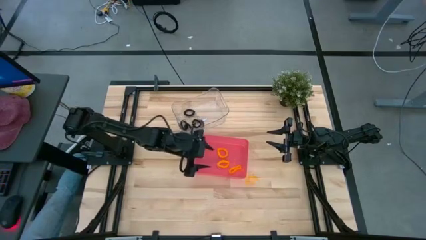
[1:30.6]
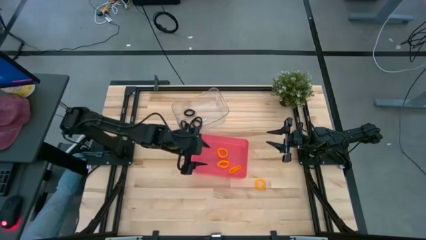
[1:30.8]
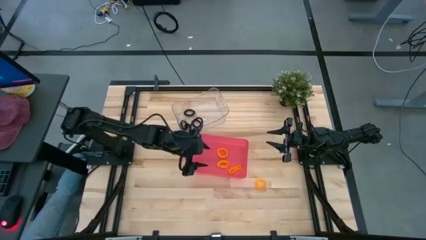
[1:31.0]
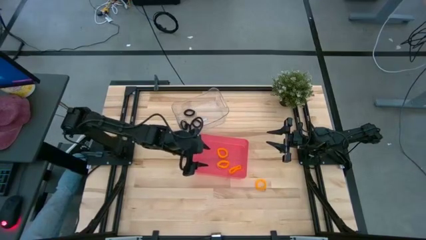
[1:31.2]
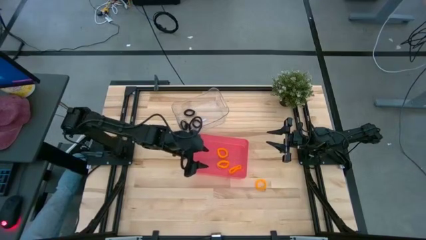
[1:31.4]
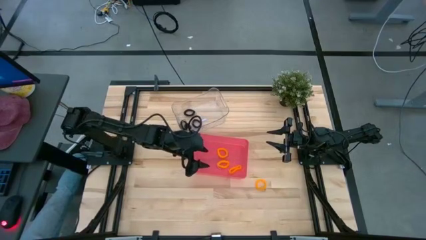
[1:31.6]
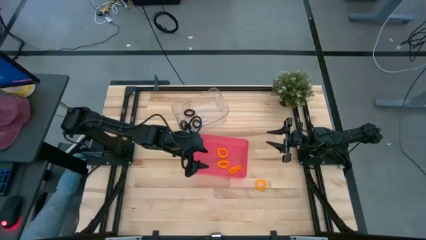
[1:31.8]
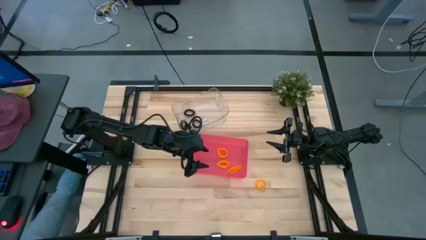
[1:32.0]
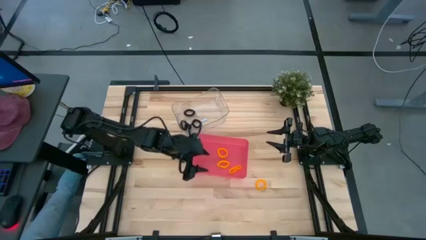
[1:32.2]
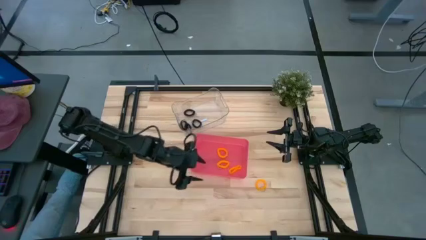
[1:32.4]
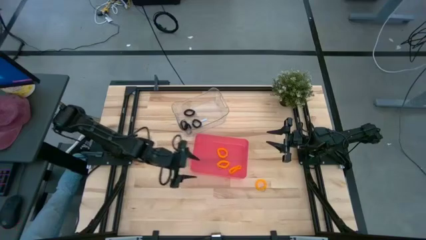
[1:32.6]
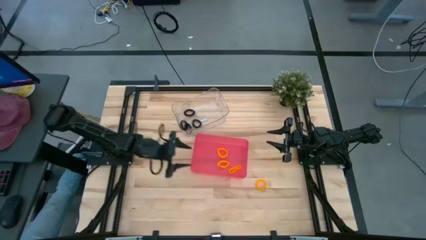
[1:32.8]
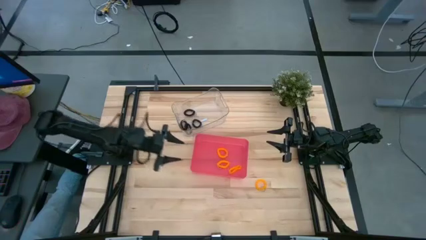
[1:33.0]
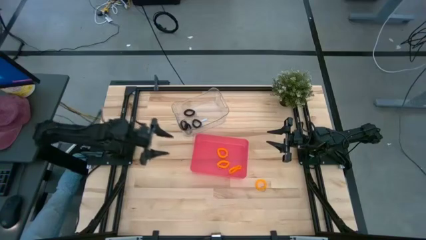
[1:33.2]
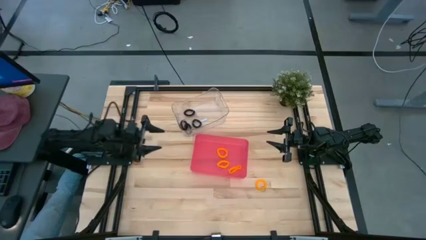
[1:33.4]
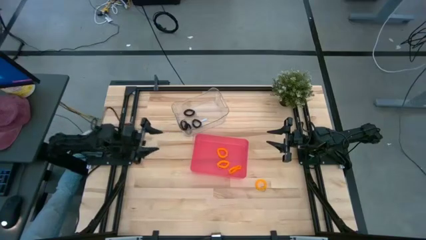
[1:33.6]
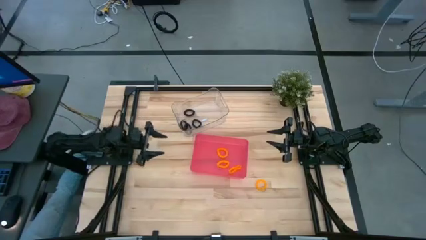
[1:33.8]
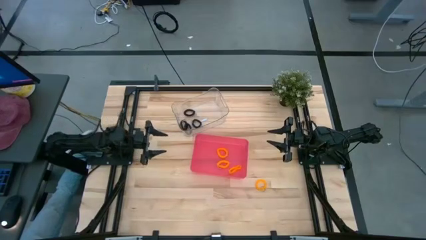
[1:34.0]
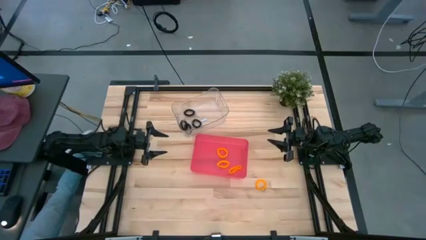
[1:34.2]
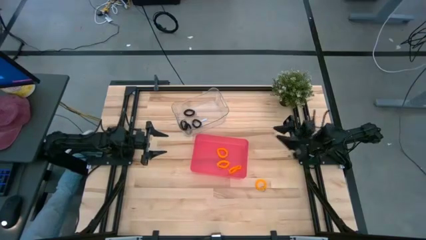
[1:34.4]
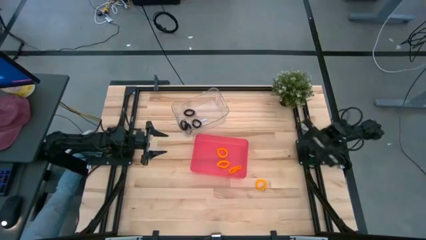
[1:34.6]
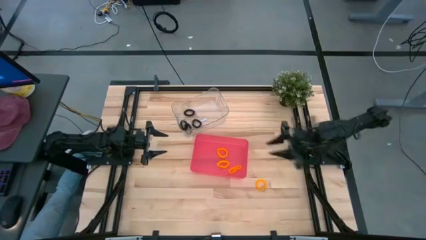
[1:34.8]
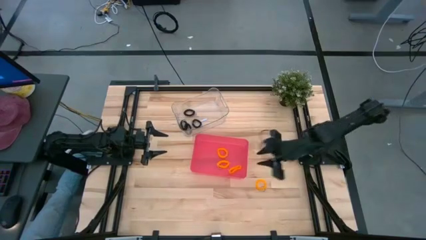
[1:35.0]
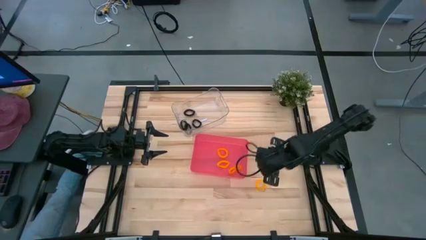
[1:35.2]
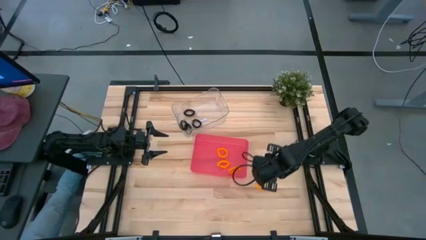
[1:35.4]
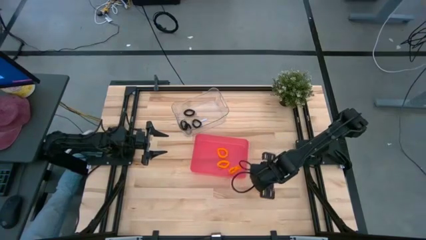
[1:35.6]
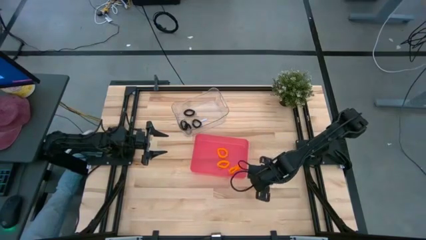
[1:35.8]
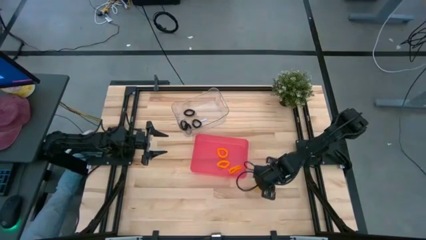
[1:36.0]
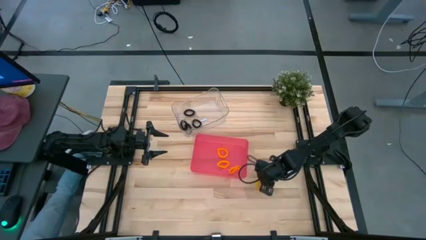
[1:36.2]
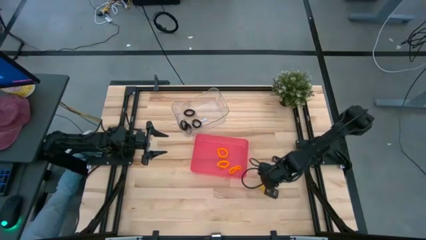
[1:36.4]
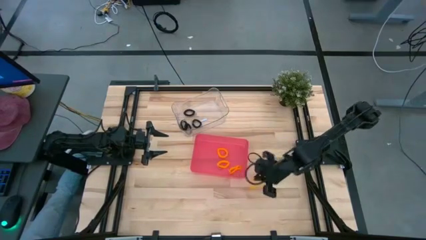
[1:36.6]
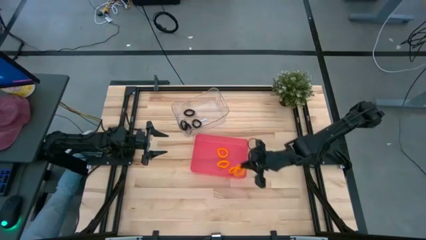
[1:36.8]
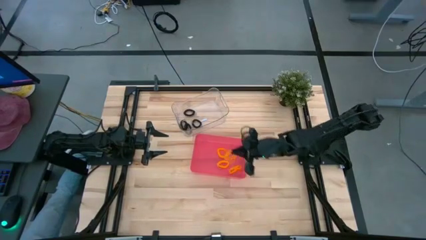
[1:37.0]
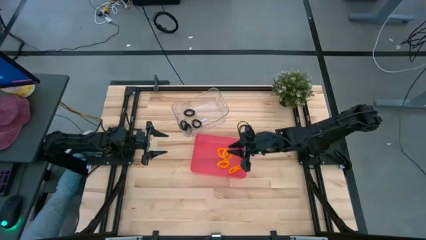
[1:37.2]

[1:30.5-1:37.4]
Task: Sort spring keychains
Put the yellow spring keychain into the red bin

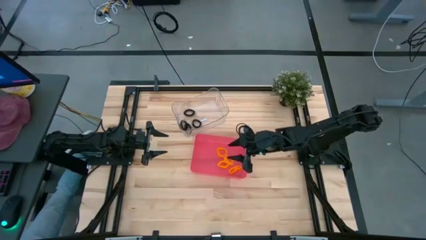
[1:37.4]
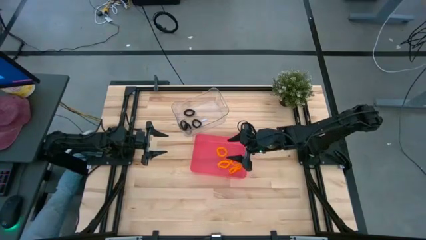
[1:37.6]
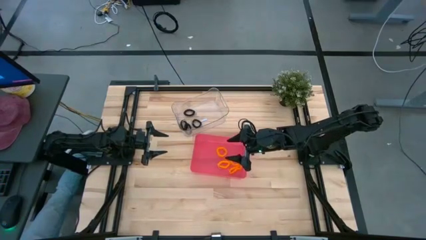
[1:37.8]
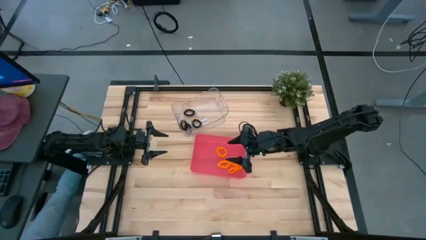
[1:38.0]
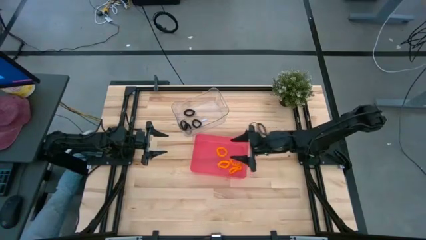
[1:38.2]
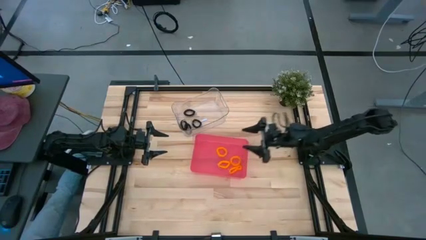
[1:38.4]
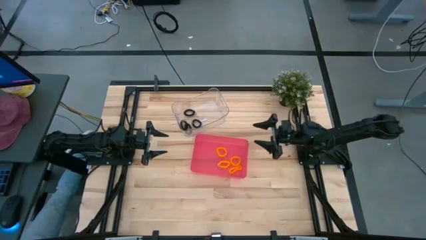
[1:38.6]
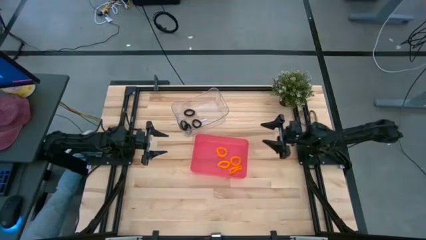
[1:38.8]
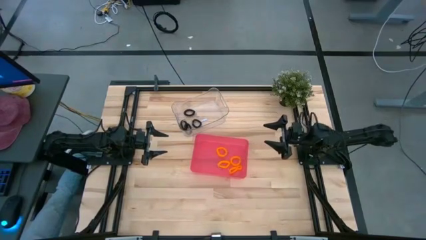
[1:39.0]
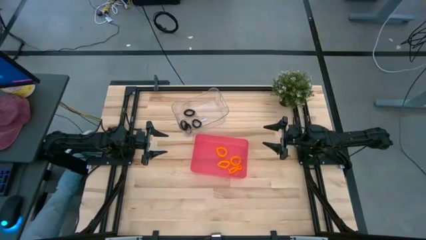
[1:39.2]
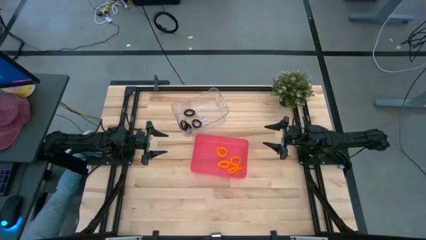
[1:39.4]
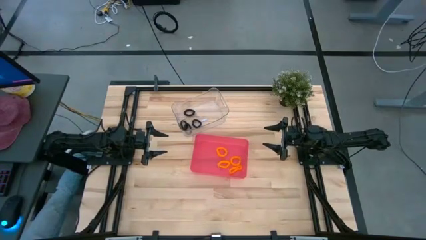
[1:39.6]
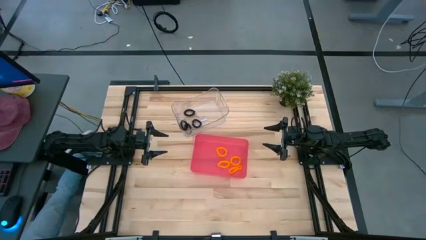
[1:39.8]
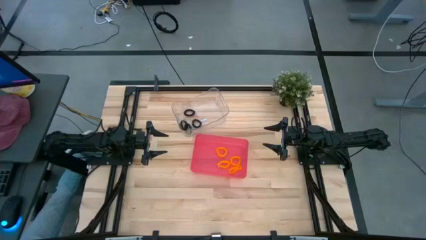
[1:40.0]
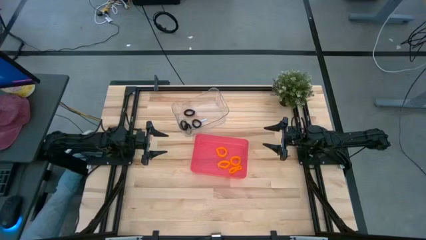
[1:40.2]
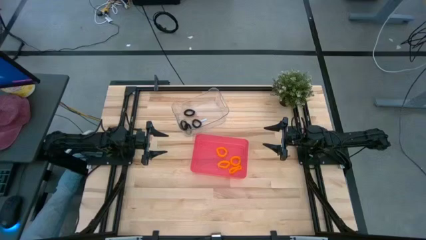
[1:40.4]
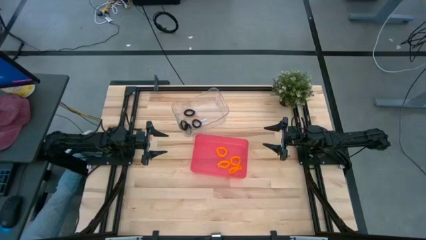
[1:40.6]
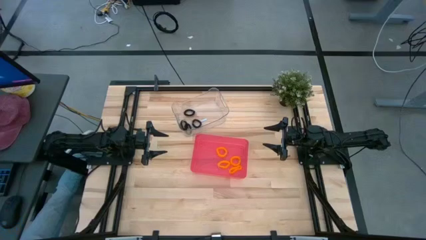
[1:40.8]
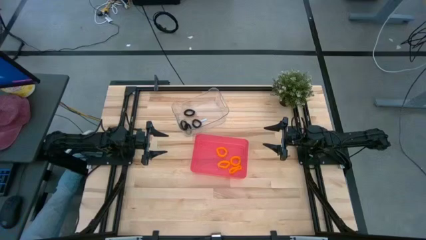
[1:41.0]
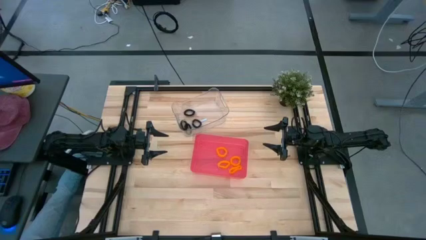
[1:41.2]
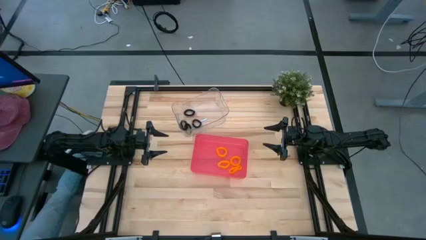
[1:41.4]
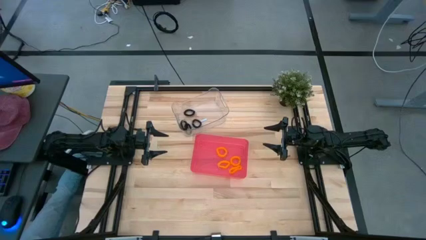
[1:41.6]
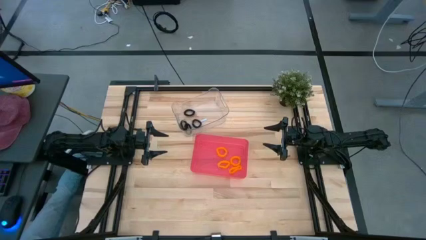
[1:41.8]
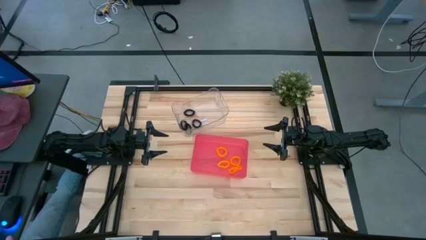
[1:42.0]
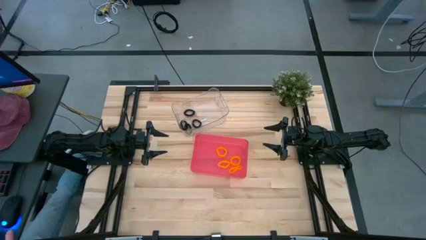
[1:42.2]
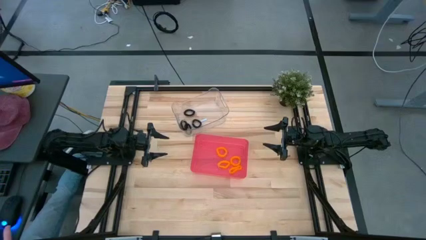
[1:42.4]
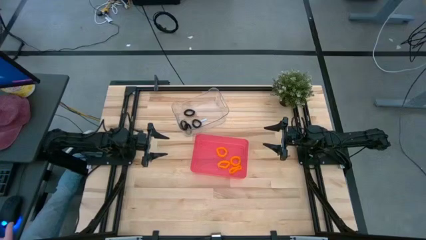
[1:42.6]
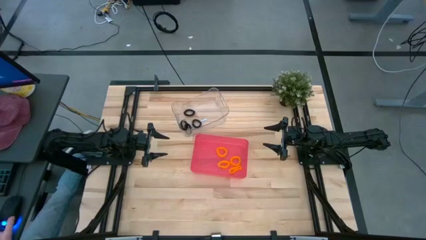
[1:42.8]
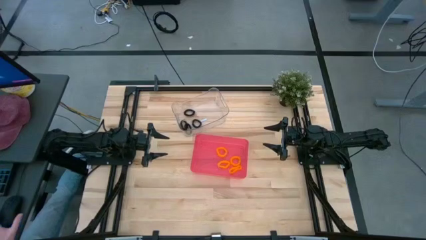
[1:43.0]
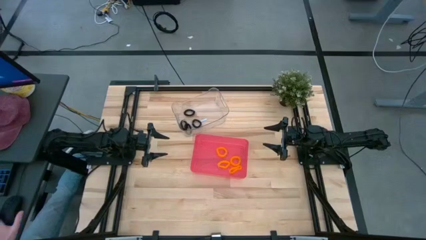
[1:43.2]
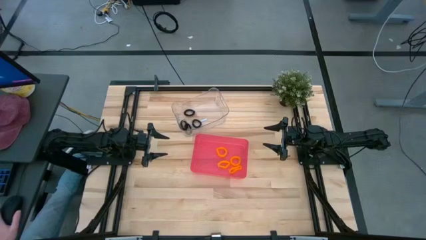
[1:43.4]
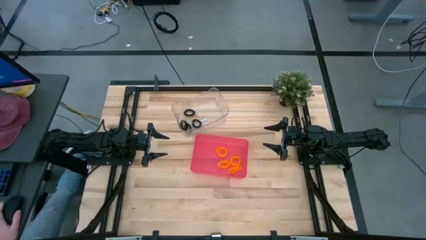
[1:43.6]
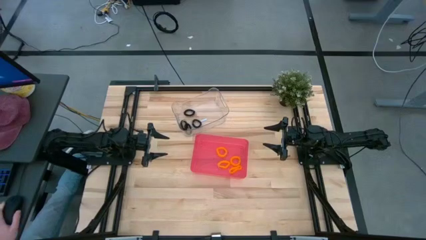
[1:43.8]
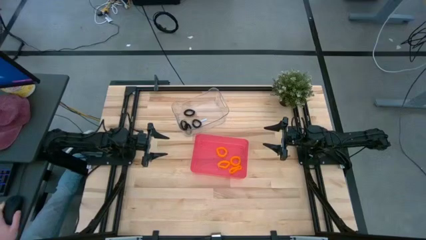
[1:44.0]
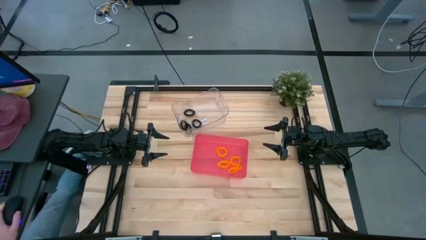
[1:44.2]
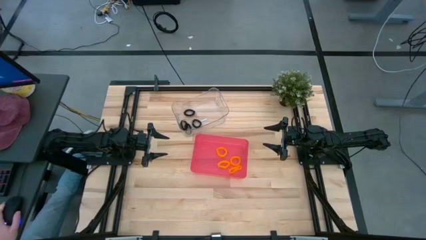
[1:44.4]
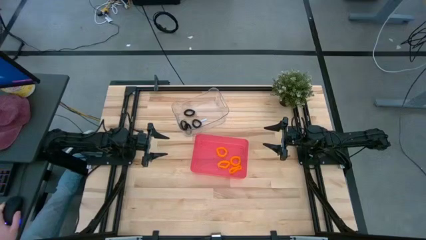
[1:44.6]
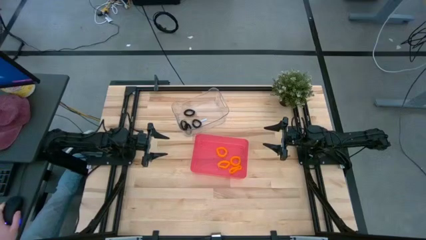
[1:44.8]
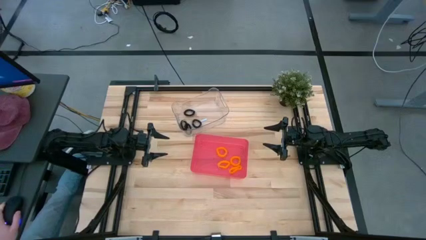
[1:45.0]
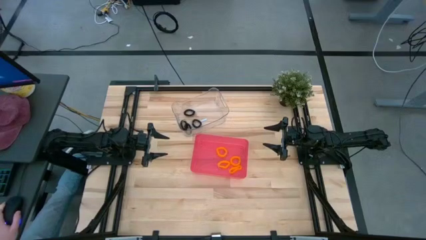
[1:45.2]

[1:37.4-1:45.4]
Return to Home Position

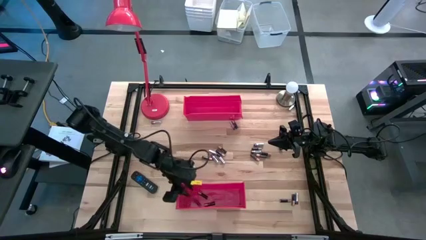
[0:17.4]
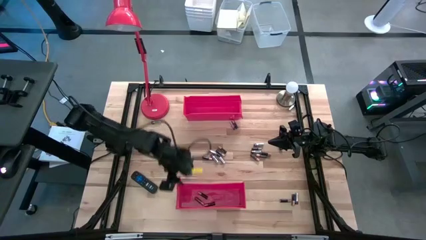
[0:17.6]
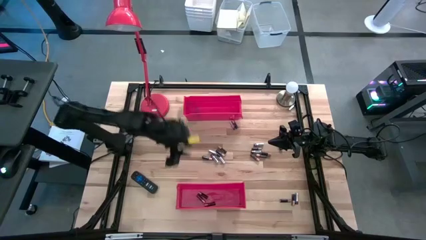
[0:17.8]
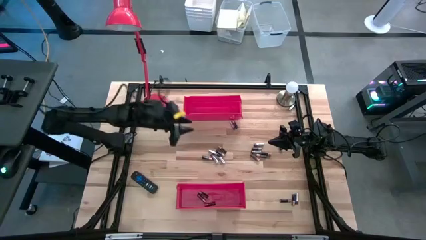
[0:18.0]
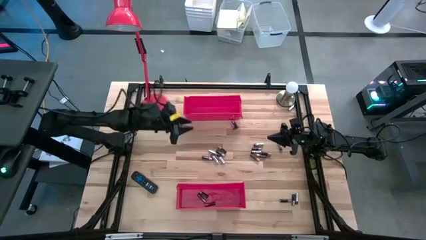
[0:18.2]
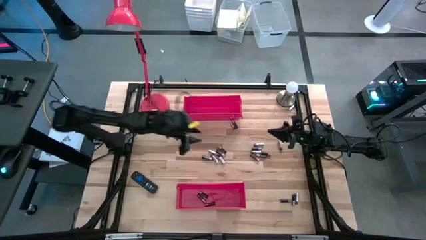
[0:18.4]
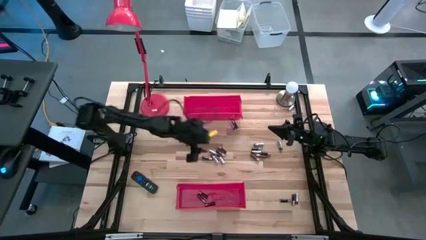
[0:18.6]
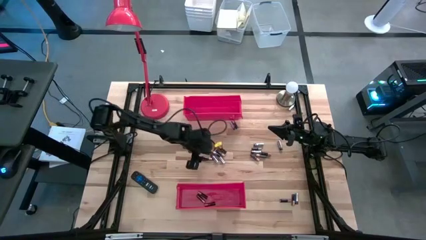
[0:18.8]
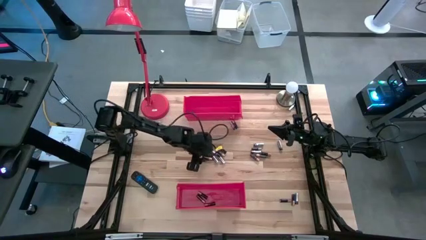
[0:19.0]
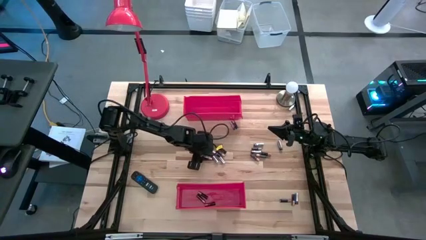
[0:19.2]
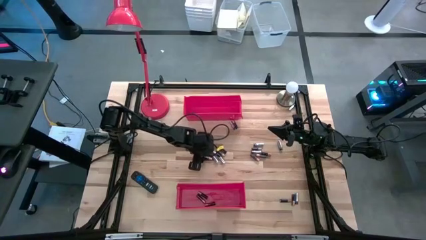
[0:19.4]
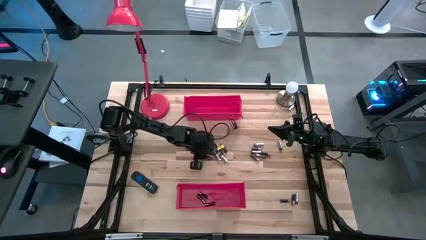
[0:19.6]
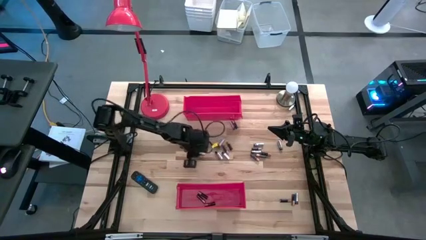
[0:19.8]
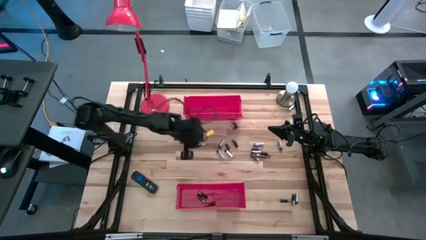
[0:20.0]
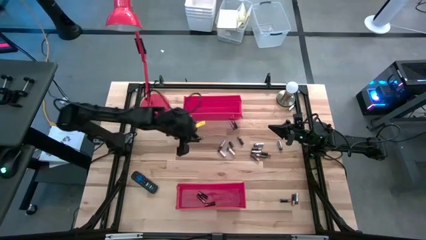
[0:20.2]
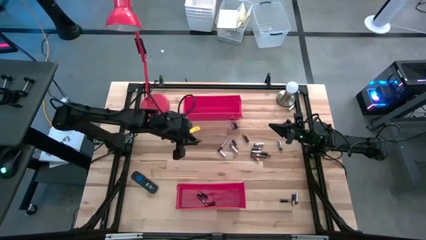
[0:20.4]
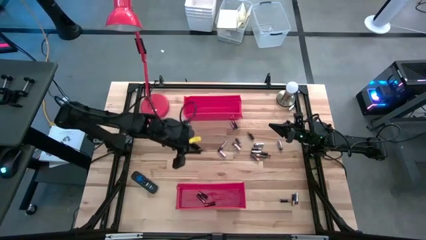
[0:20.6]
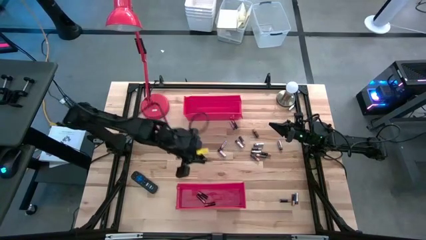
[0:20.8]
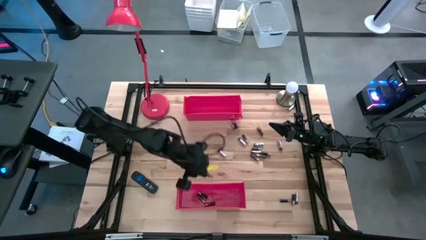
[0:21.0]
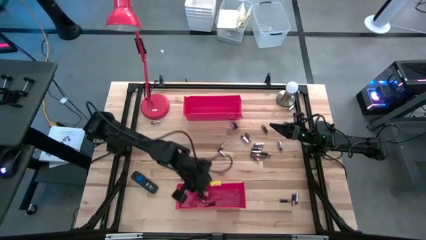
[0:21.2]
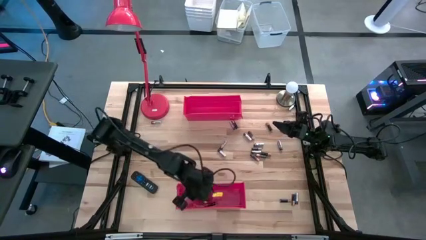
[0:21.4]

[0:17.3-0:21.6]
Task: Sort batteries
Put the brown battery into the bottom red bin
